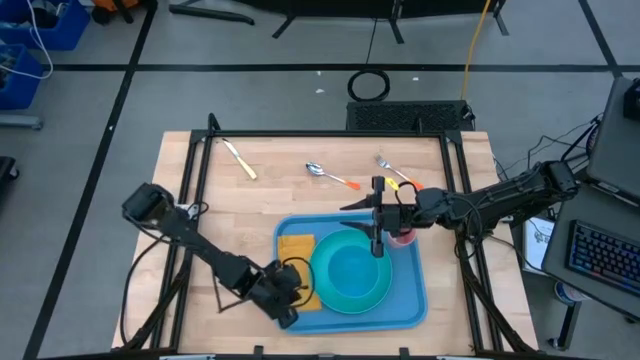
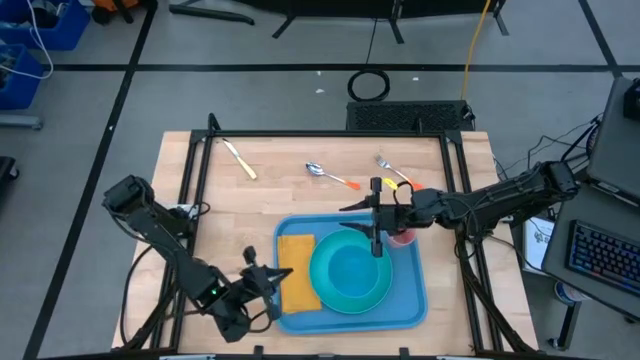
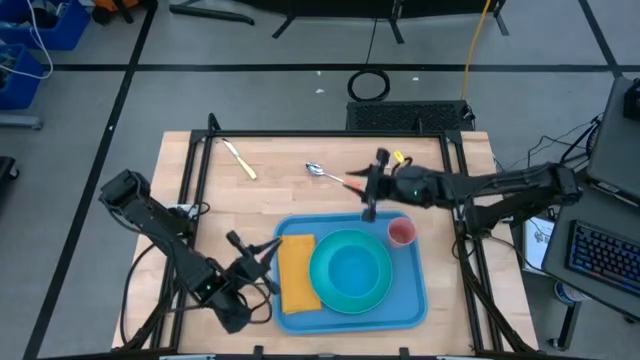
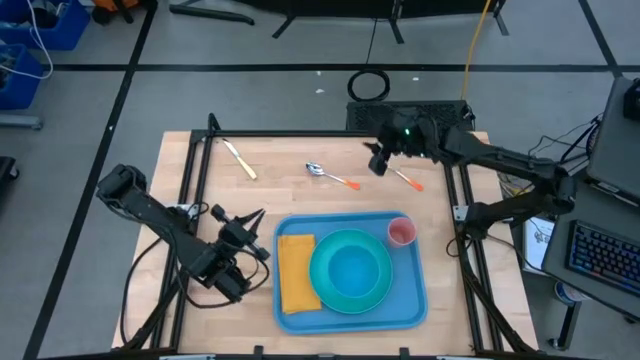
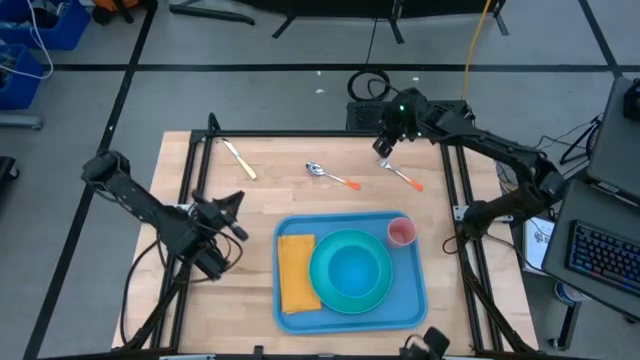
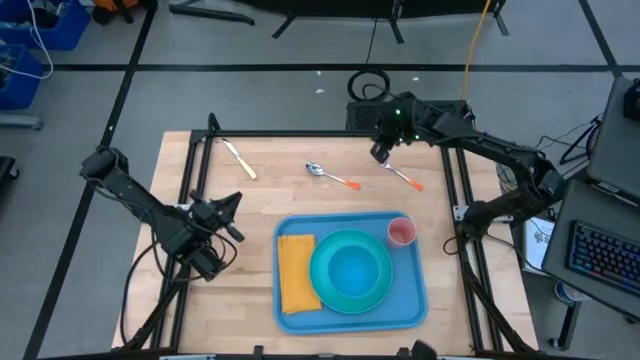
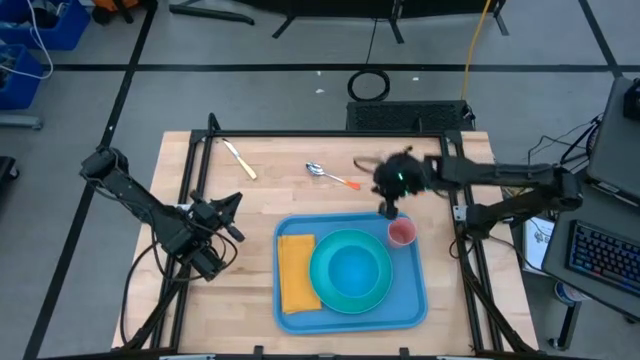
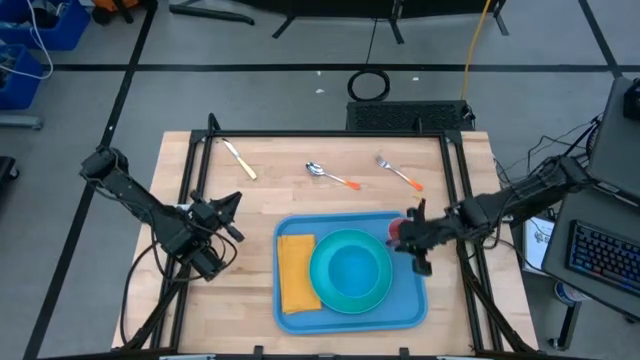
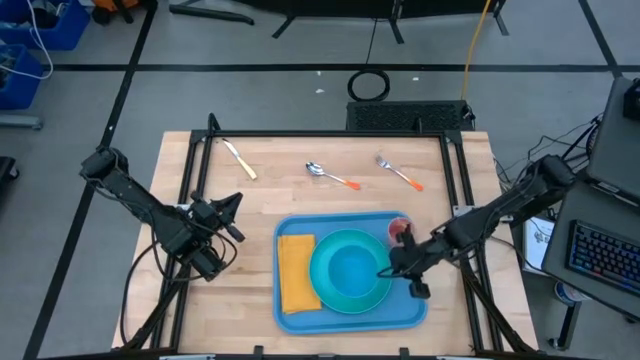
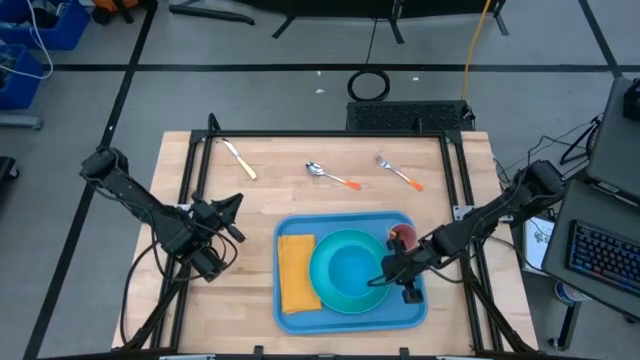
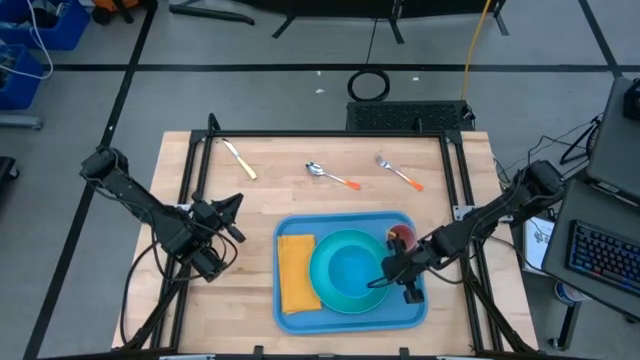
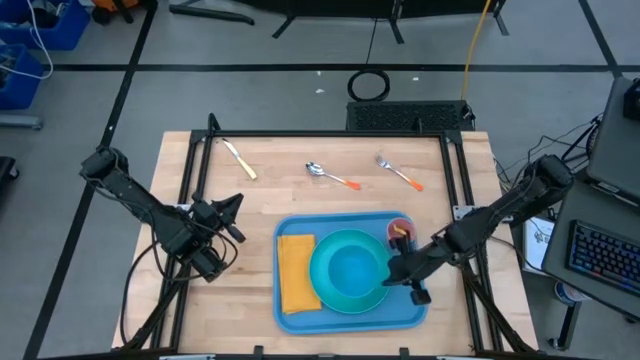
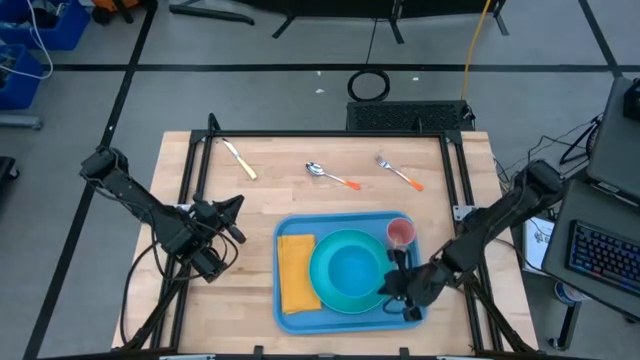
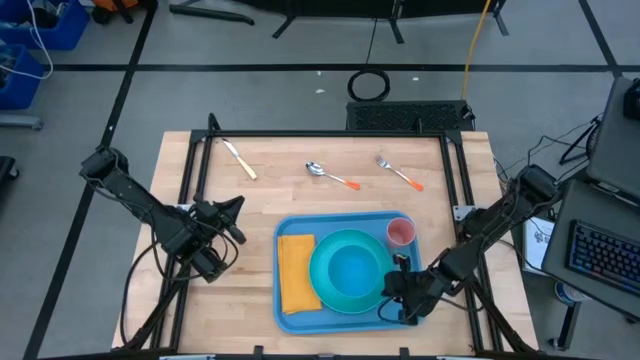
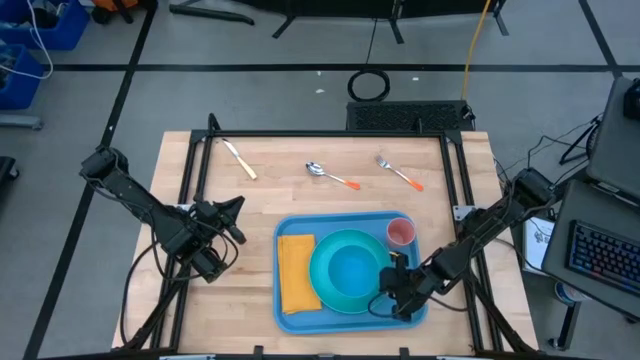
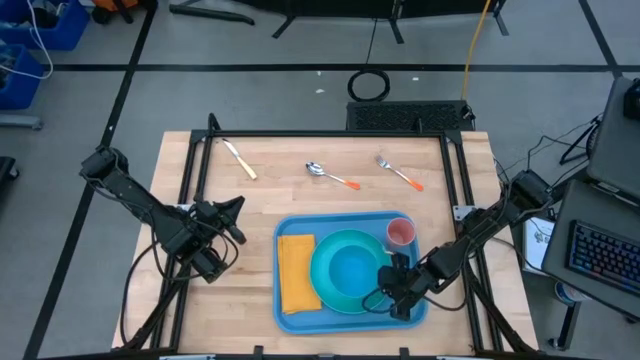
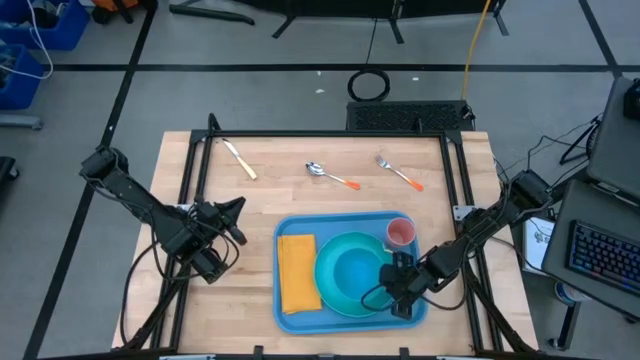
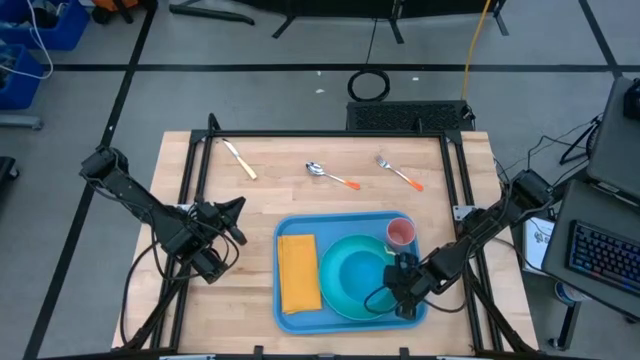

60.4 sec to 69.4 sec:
Task: Set up tray
Adjust the blue plate on the blue serving tray

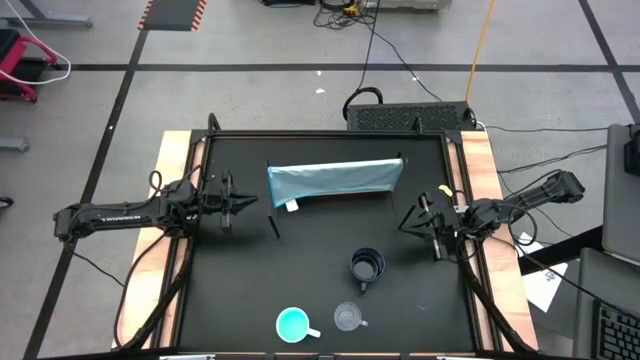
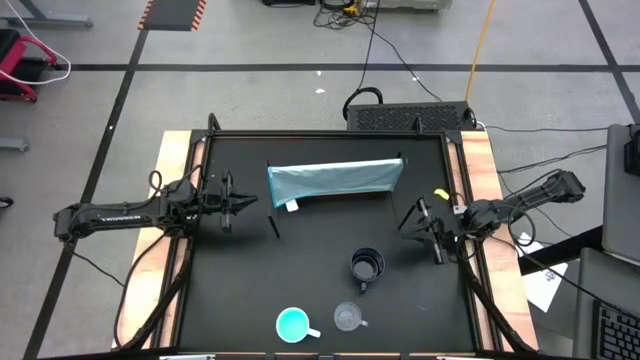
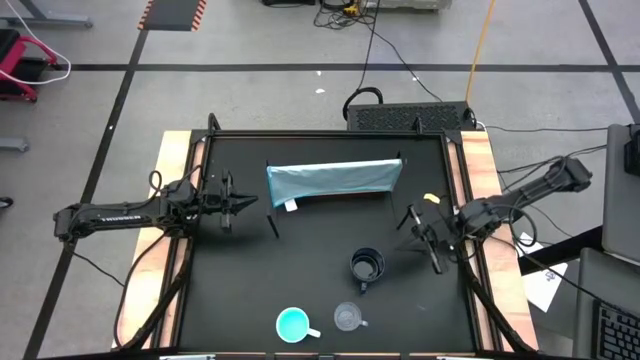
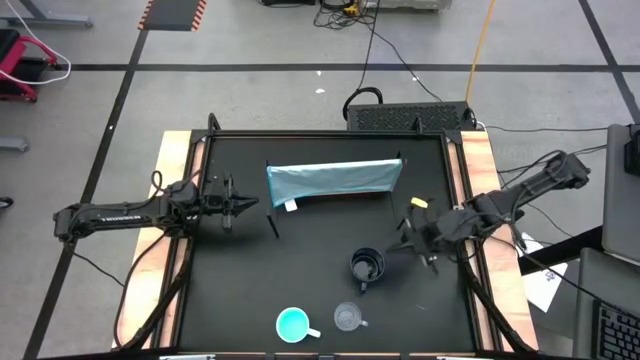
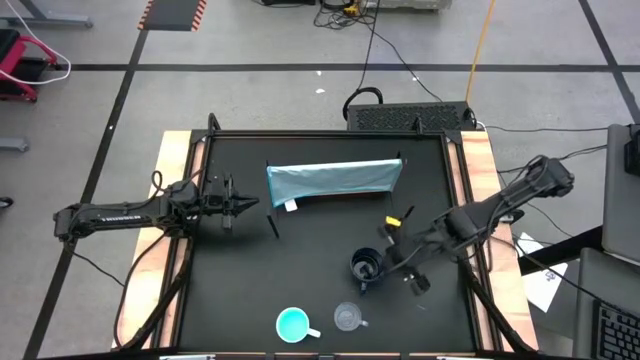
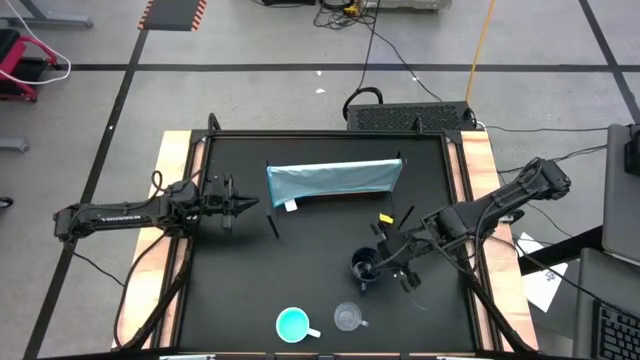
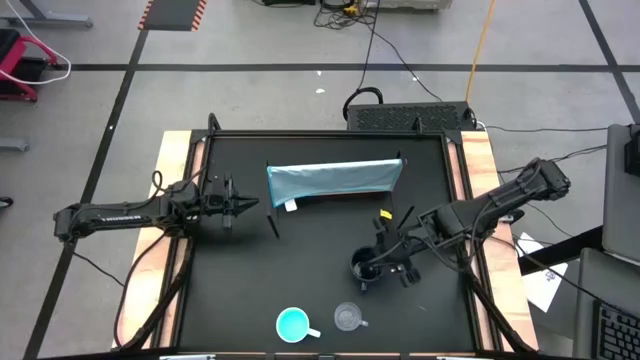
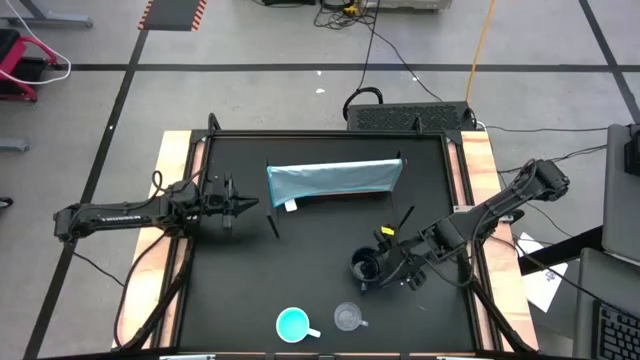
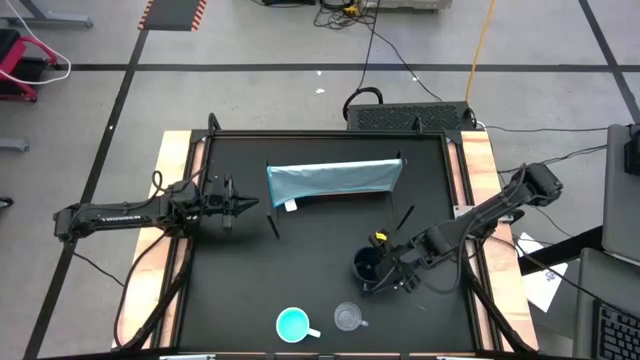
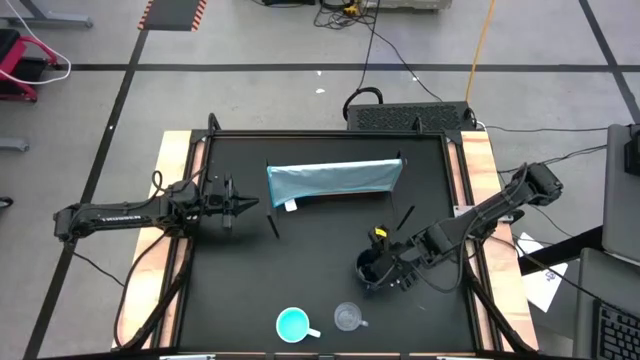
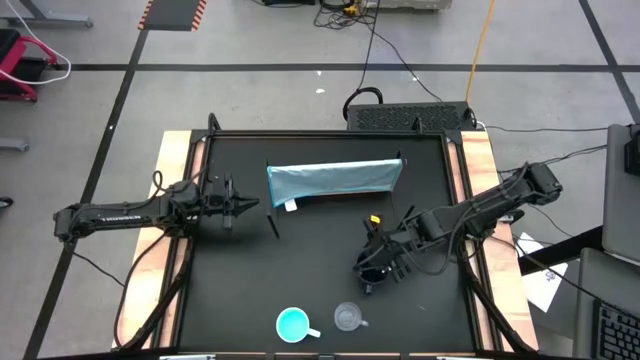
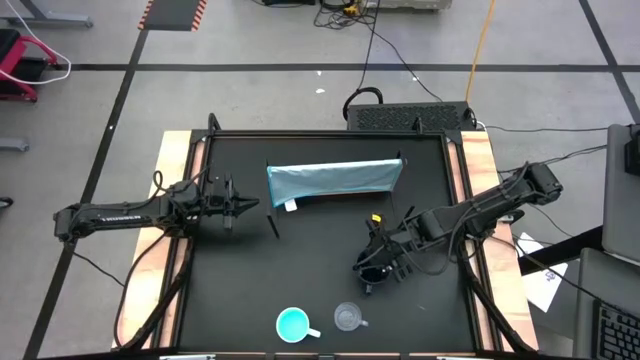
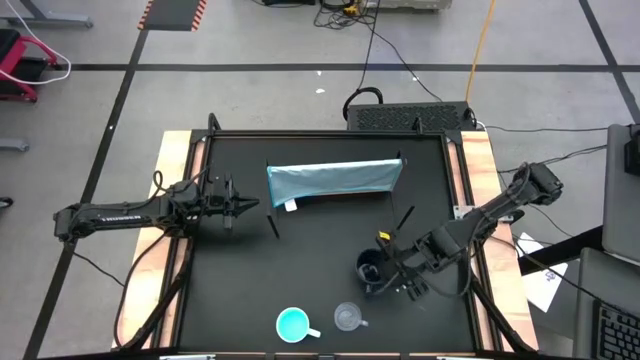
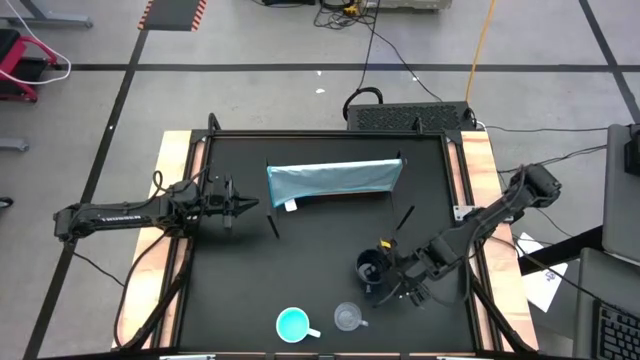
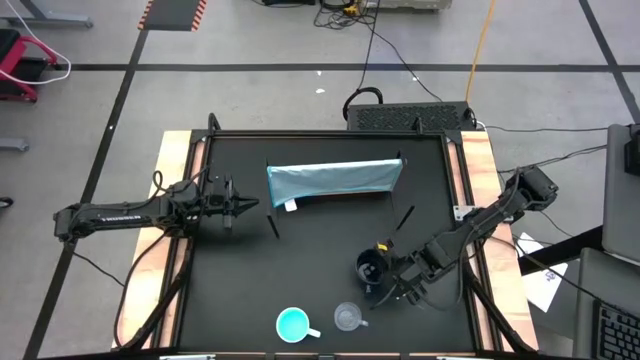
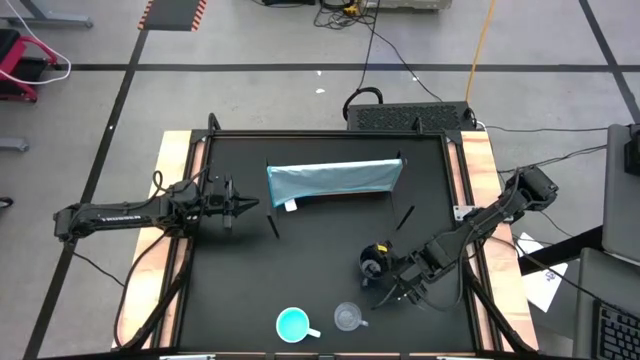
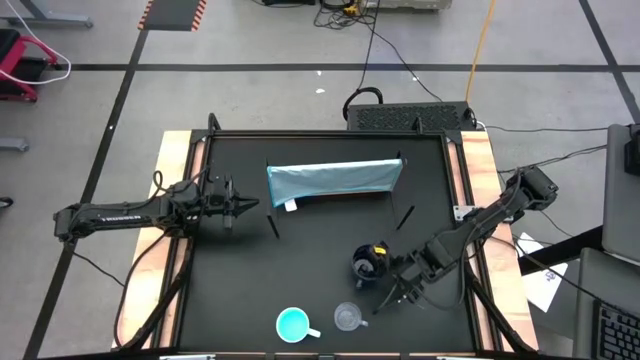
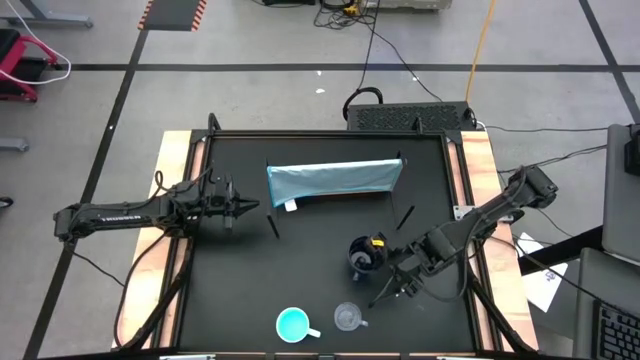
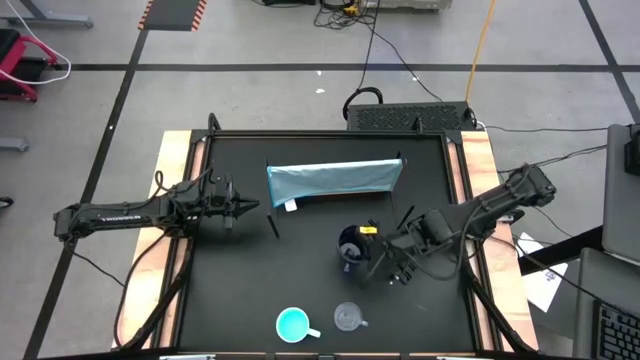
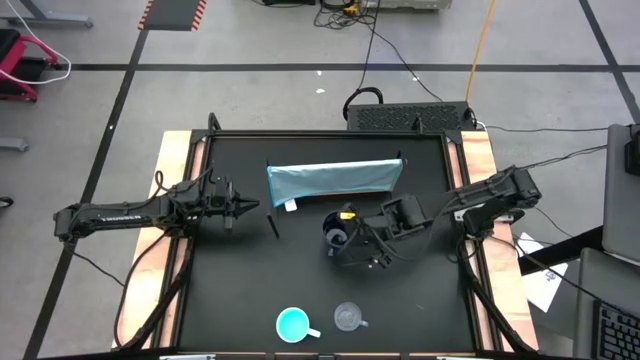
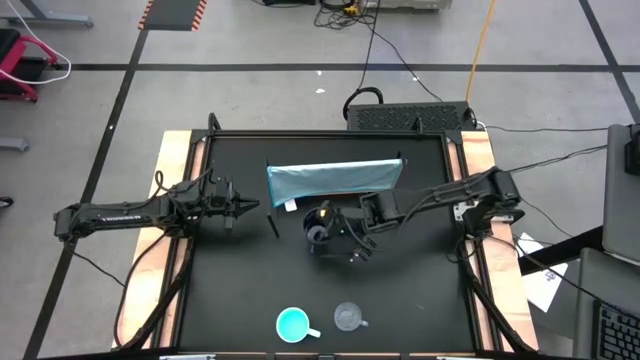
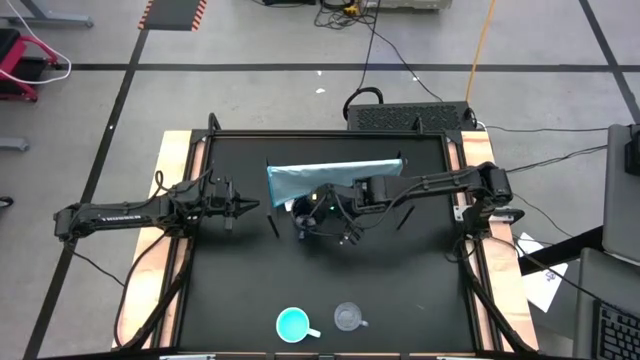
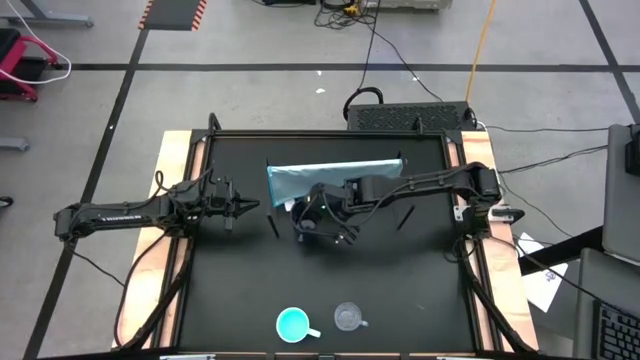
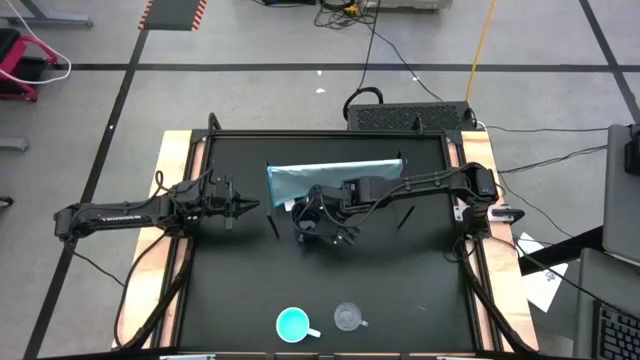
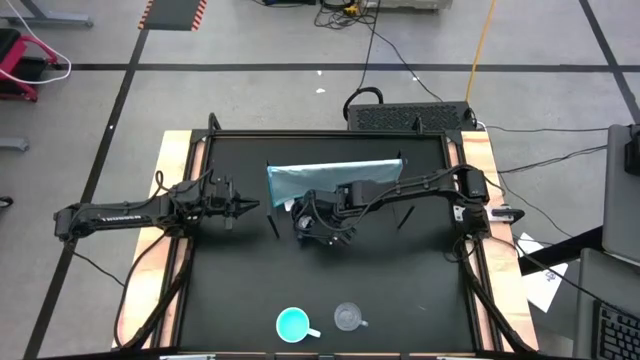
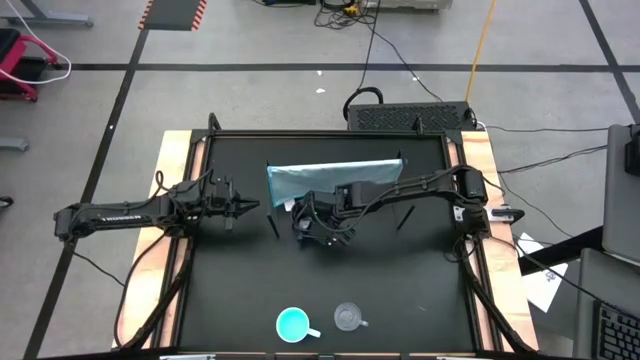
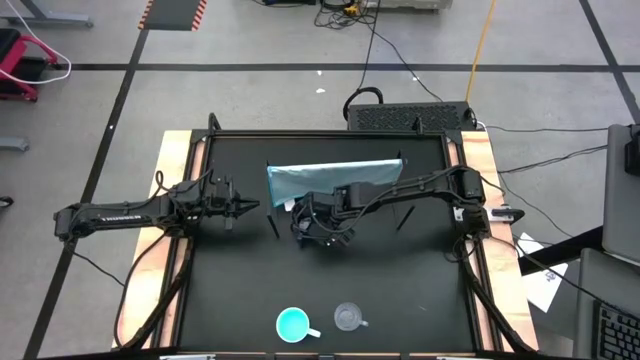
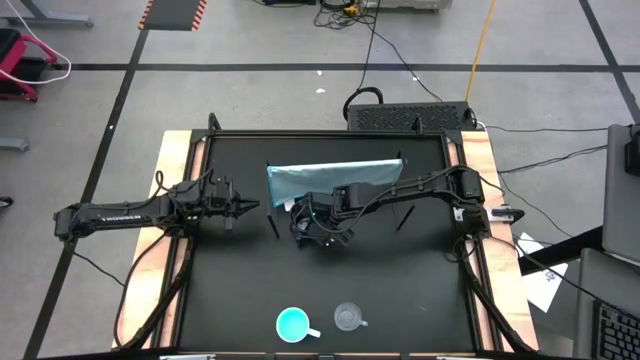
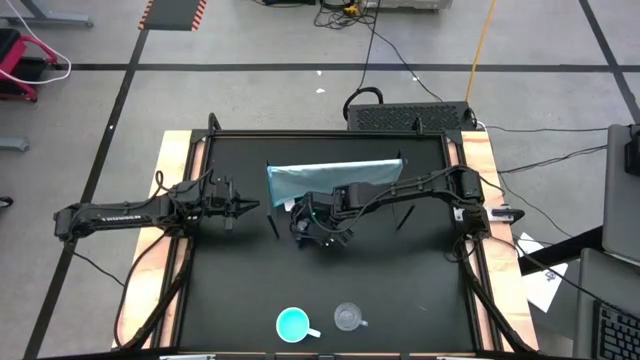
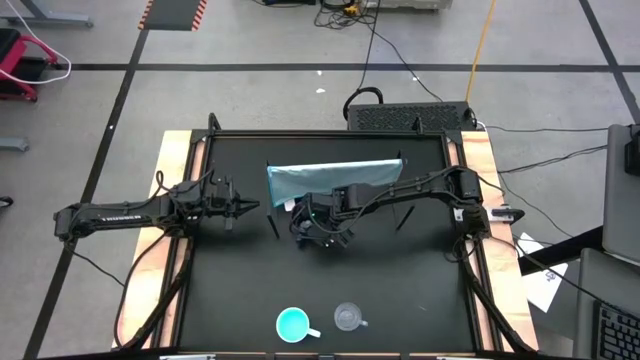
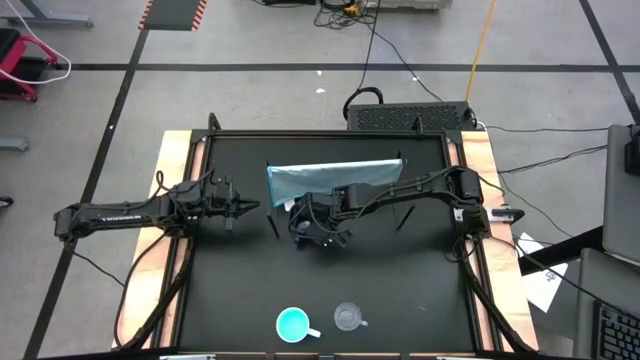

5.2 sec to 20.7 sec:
Task: Stack small to large cups/mugs on shelf
Move the blue mug to the center of the table
